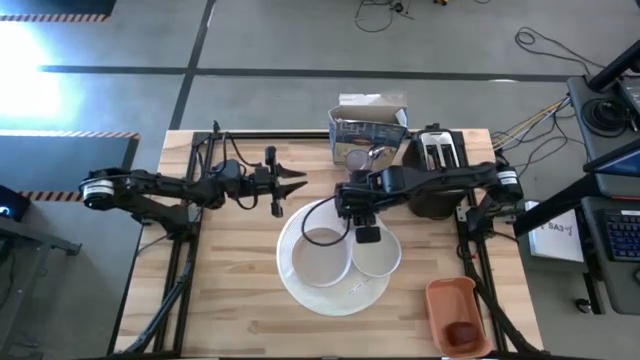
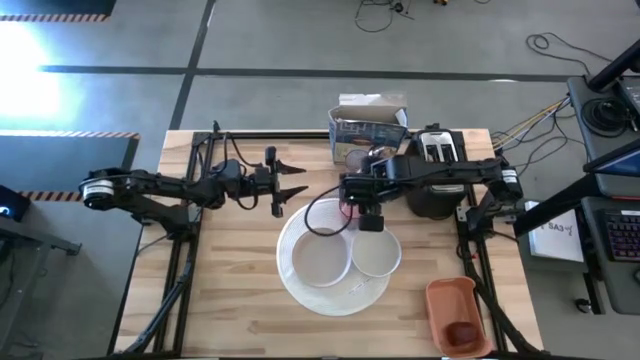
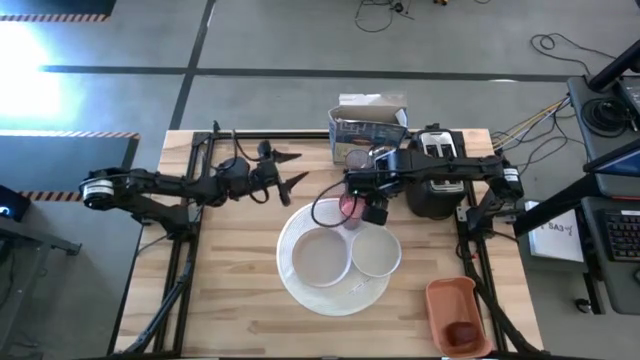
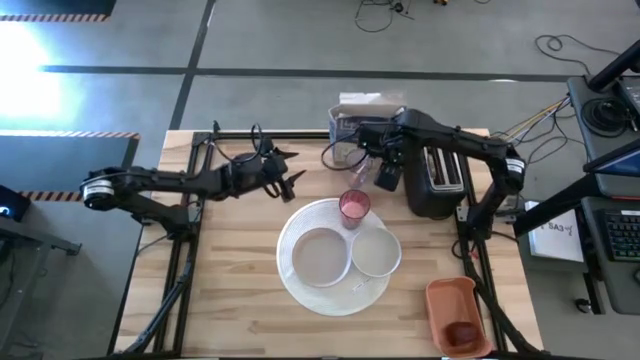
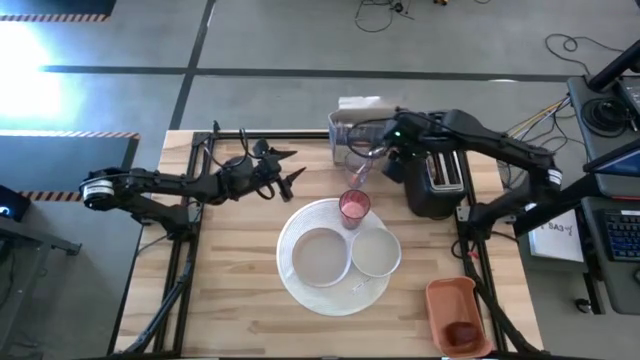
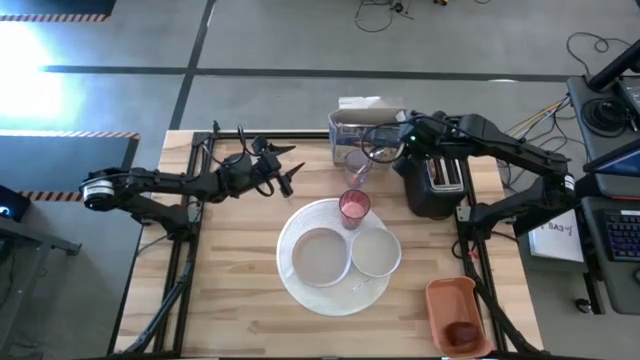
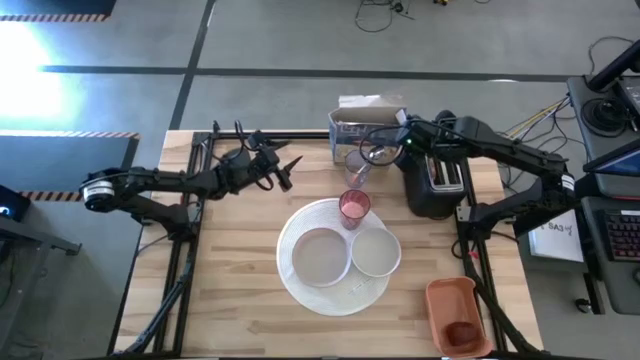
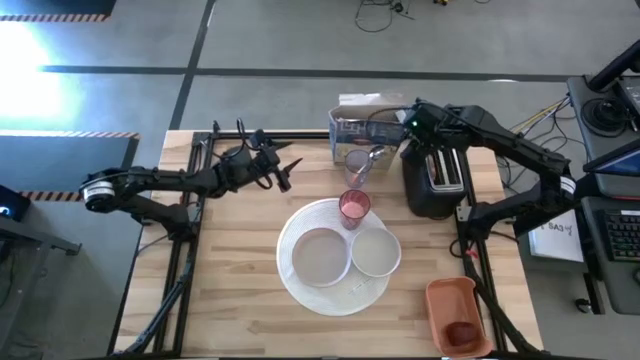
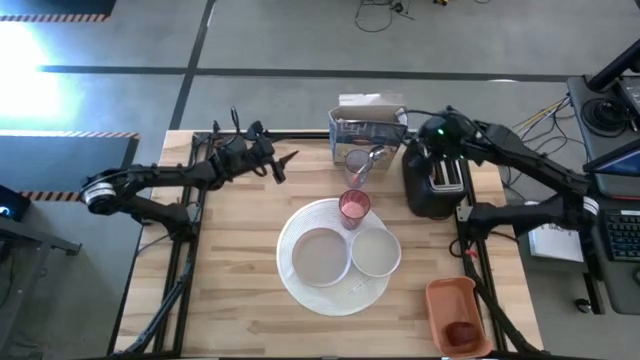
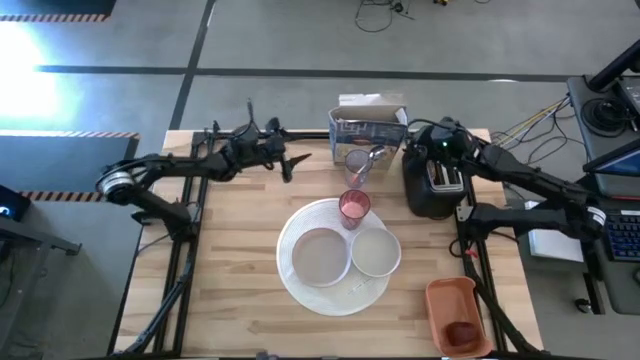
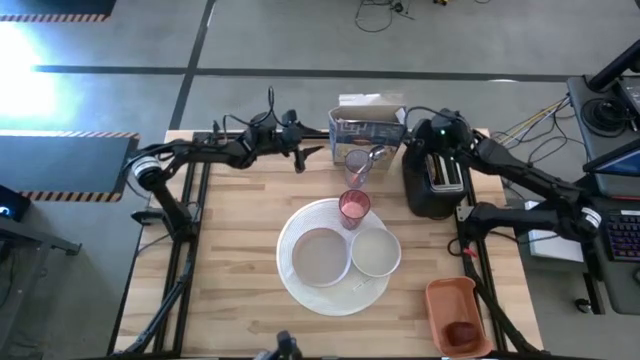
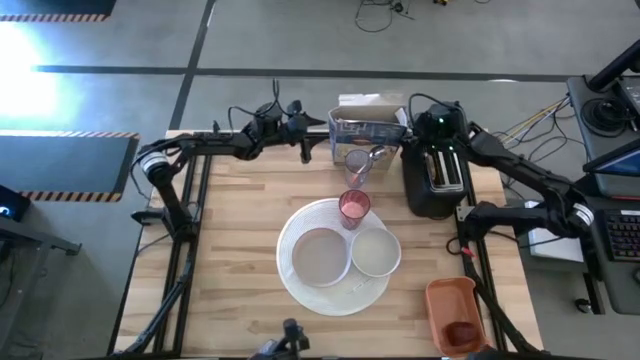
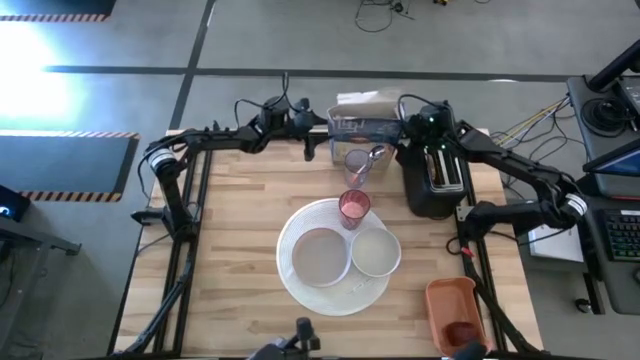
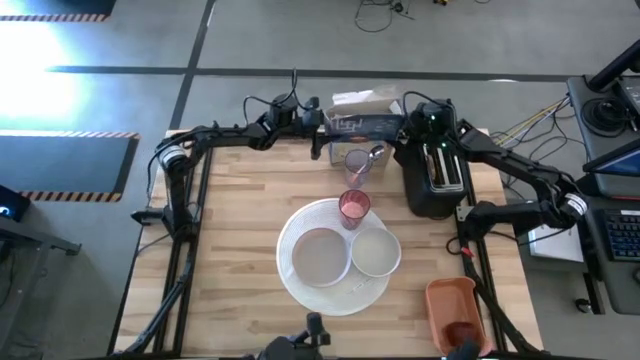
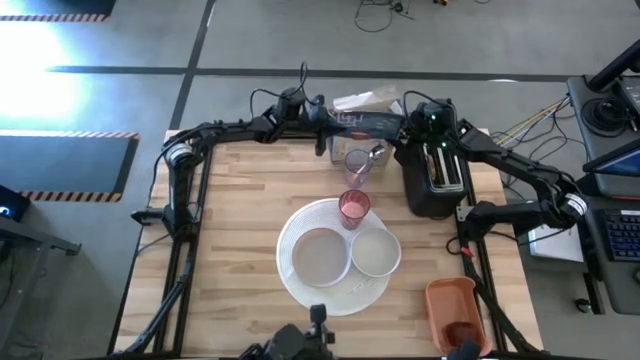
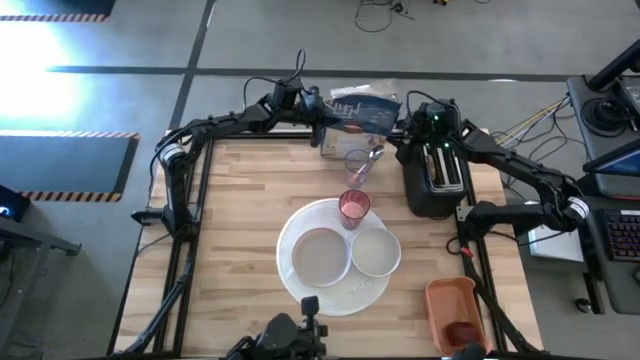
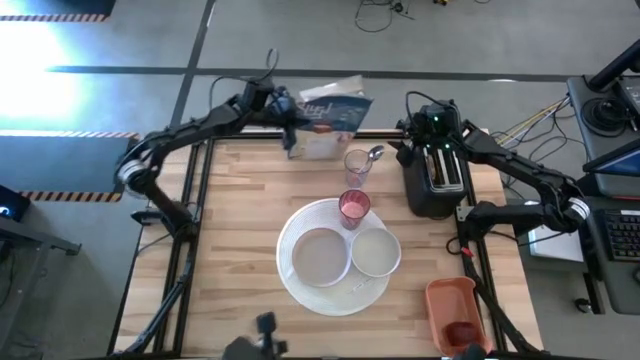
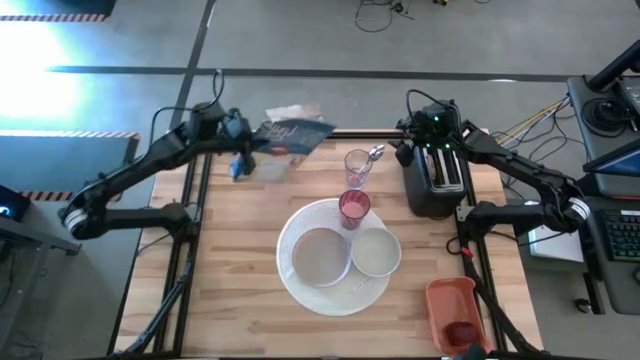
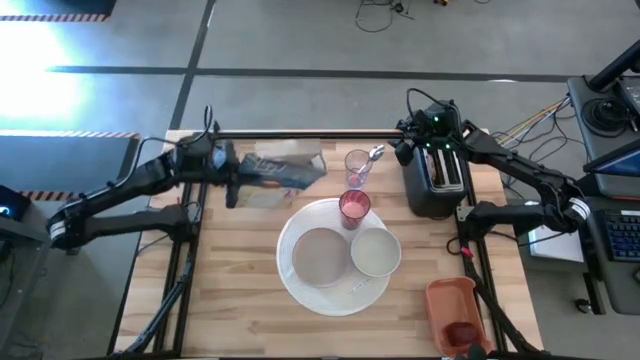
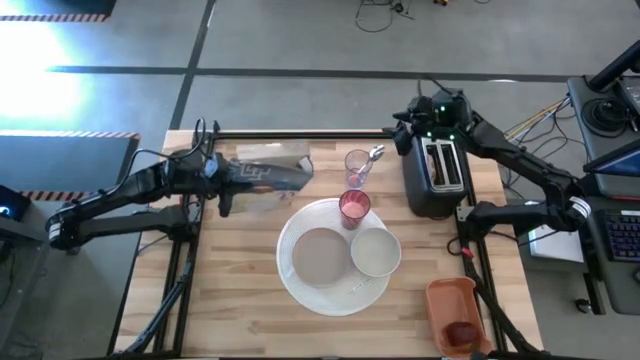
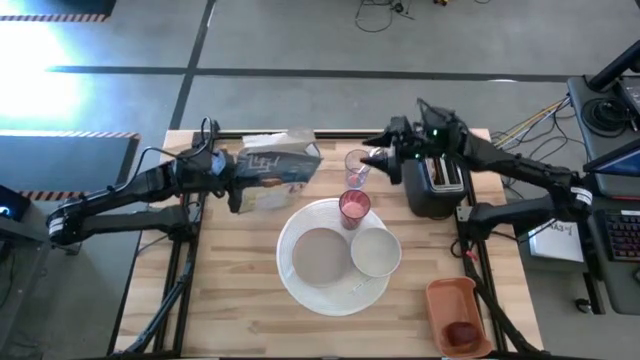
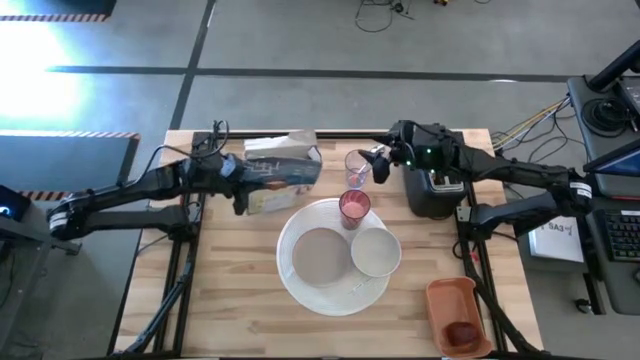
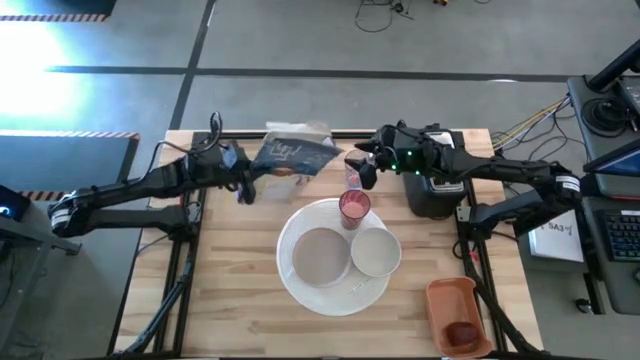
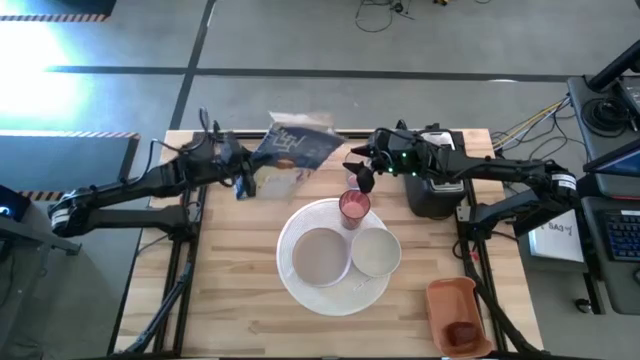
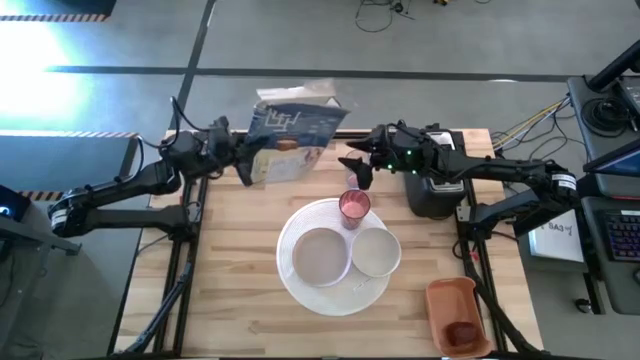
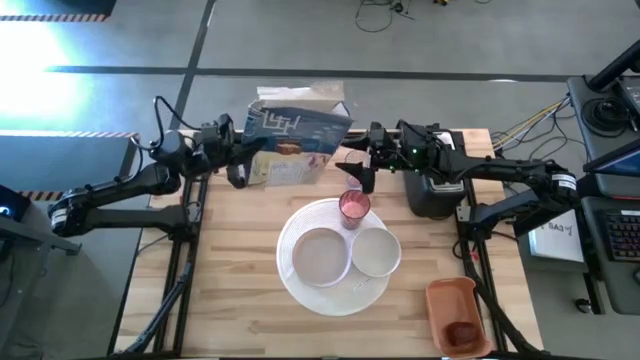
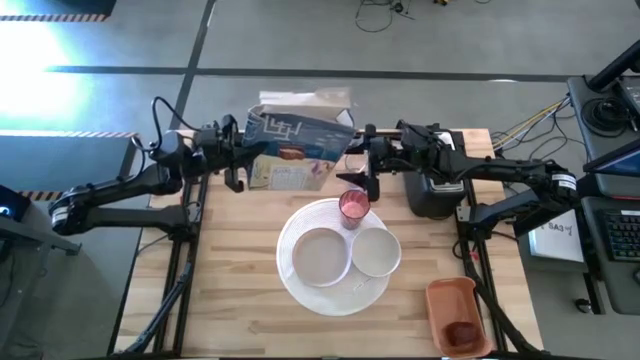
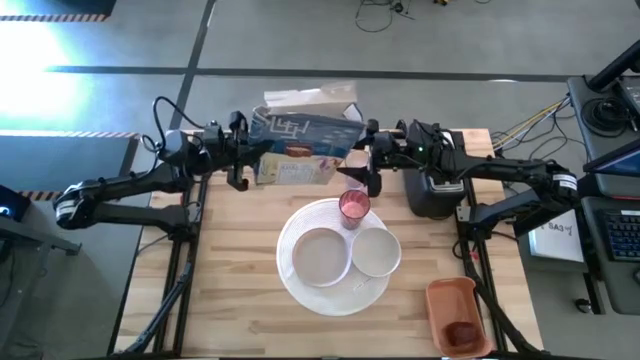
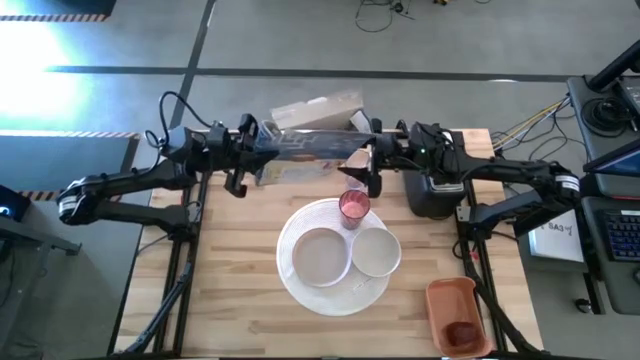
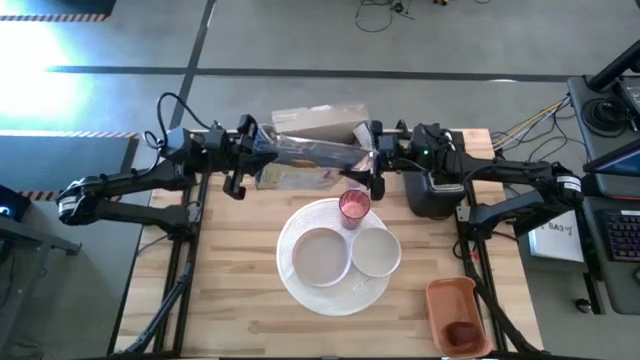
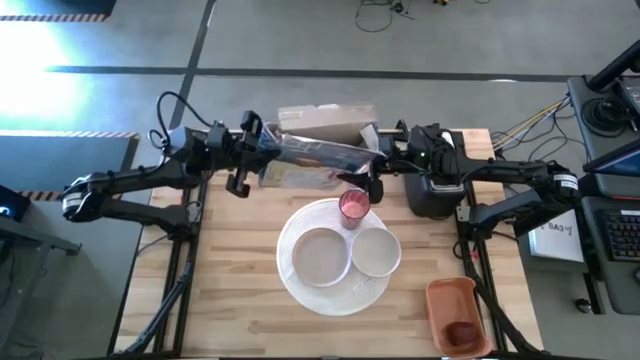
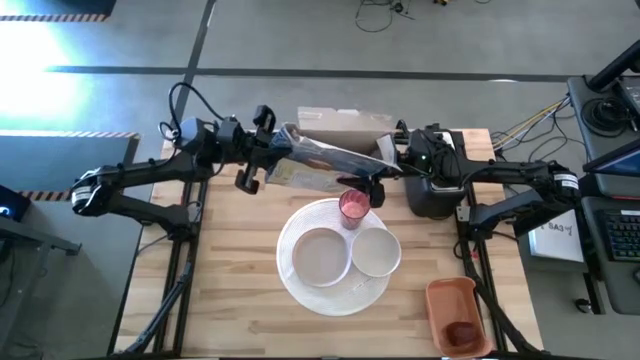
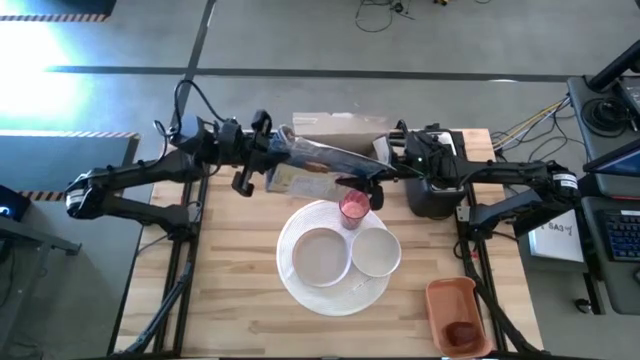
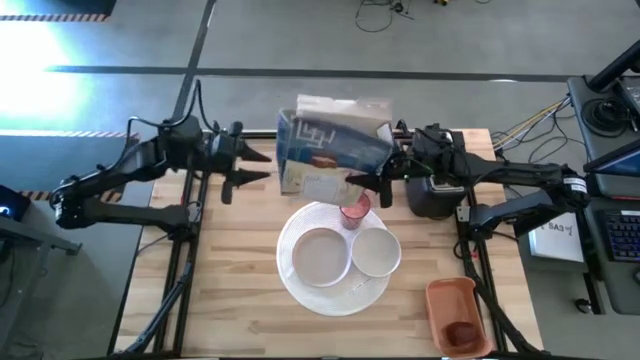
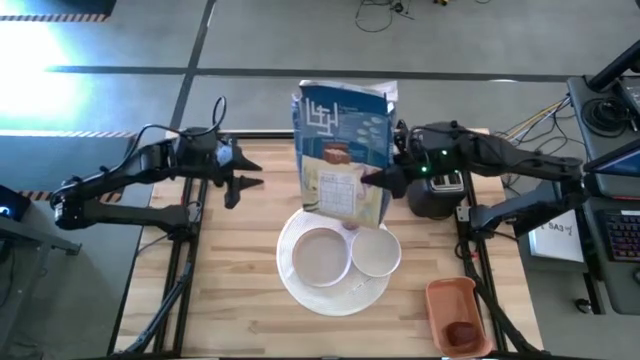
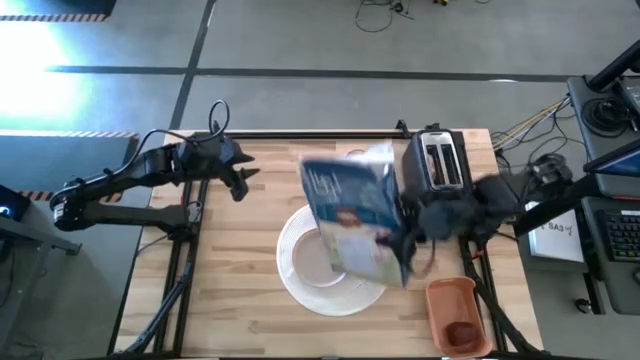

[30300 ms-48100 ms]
Task: Arrange a breakfast setting
Pour the cereal from the cereal box into the white bowl

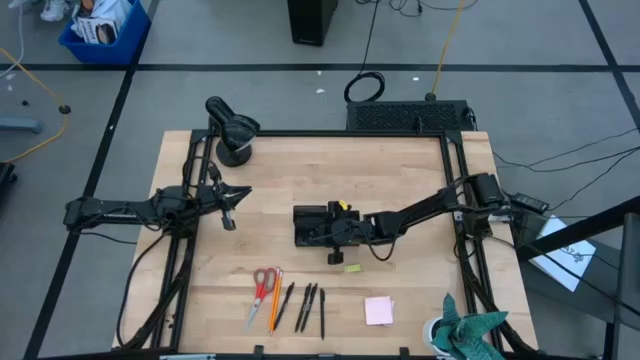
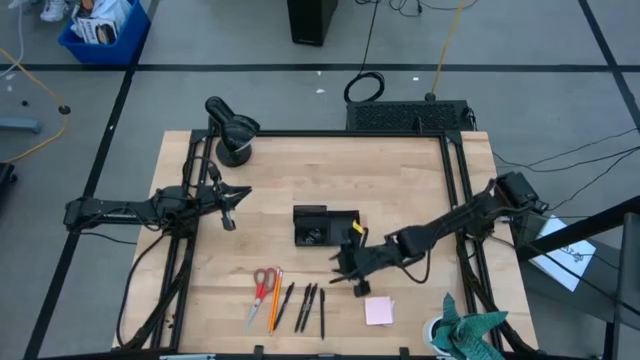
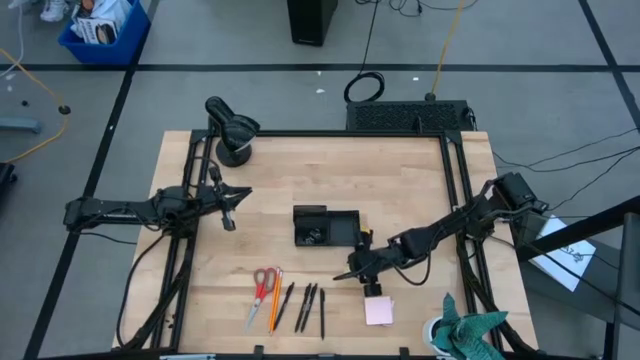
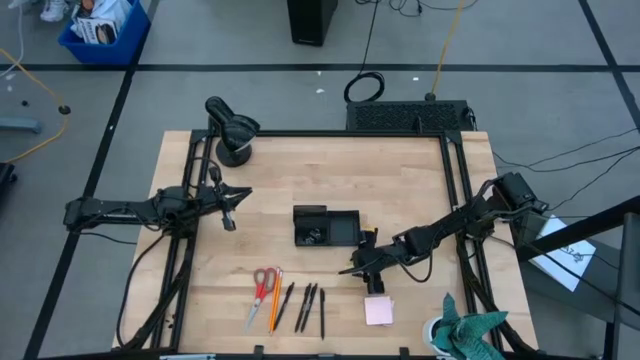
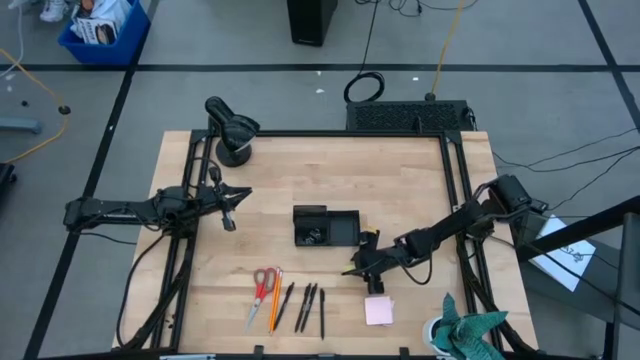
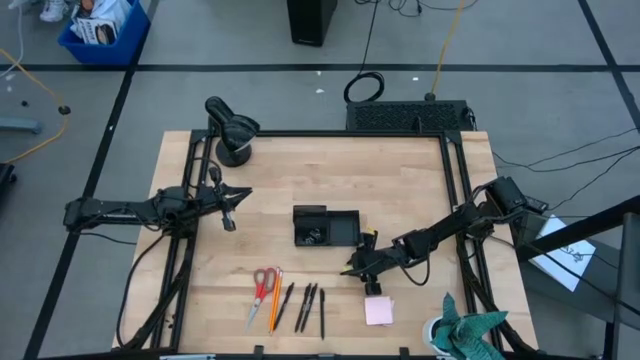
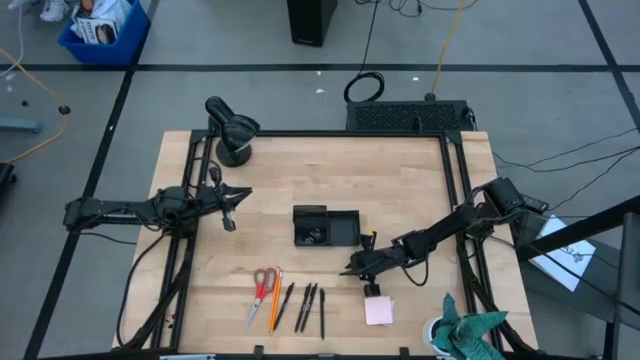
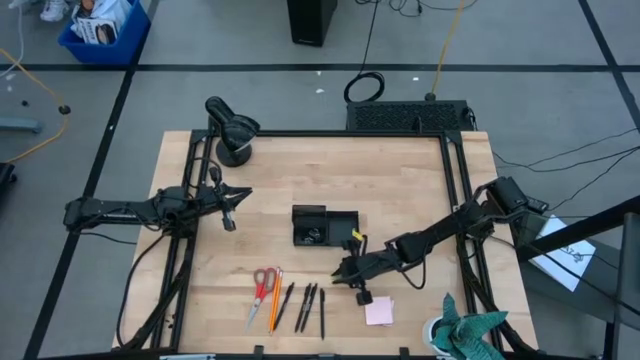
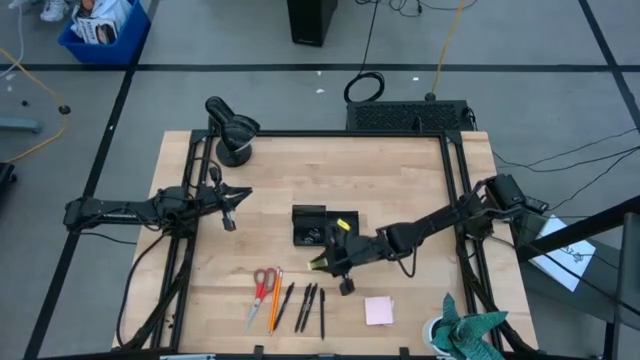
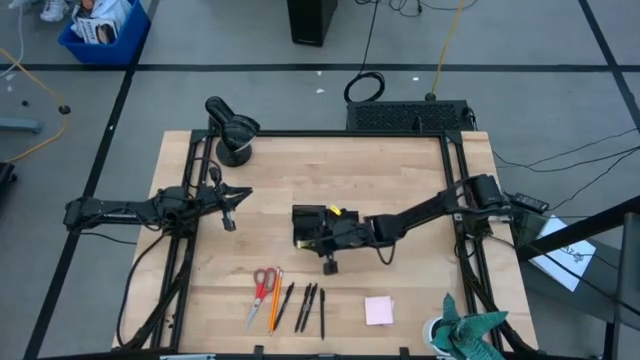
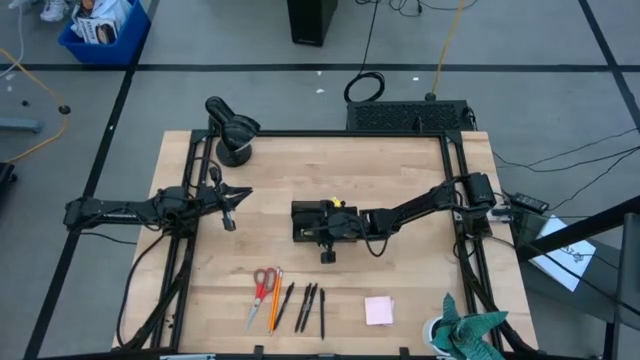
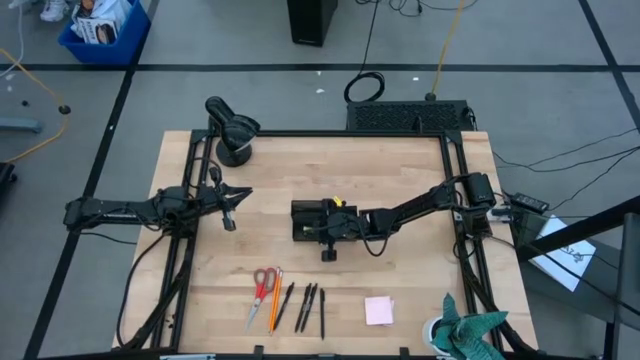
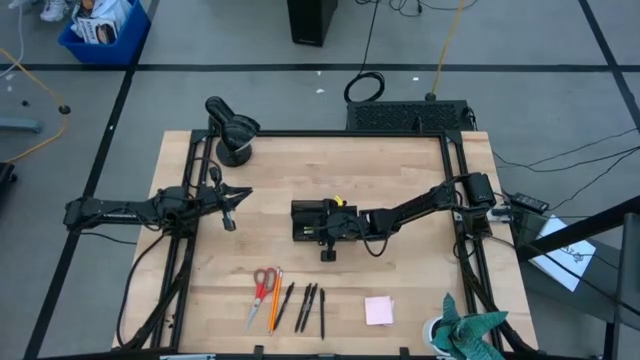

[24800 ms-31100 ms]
Task: Pick and place office supplies into organizer
Put the light green eraser into the black desk organizer
